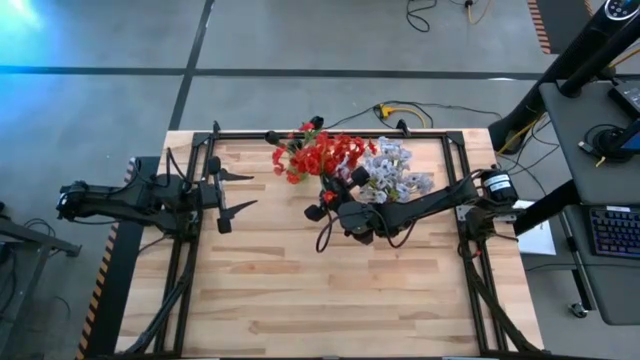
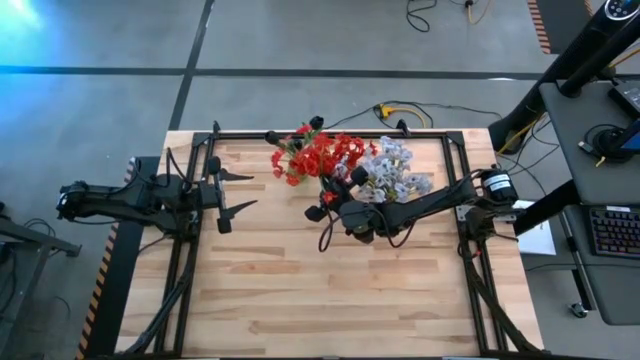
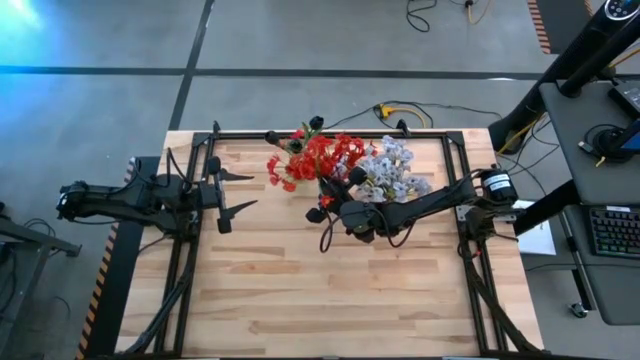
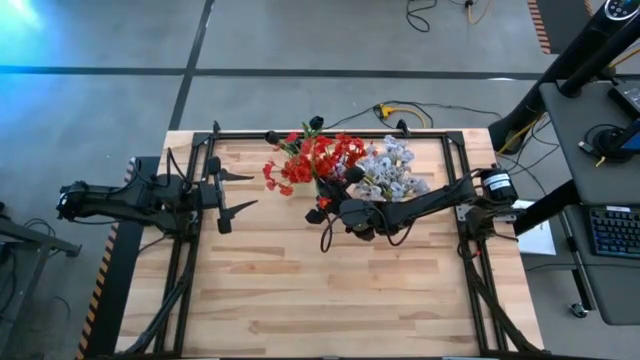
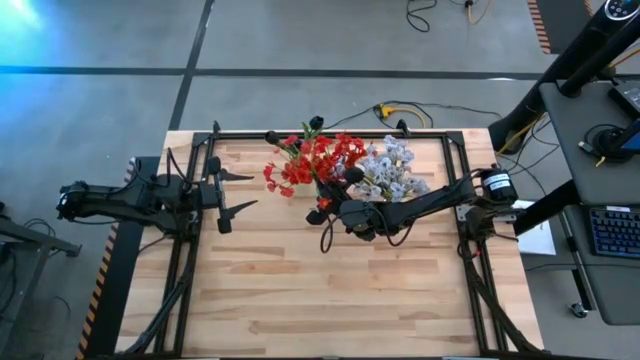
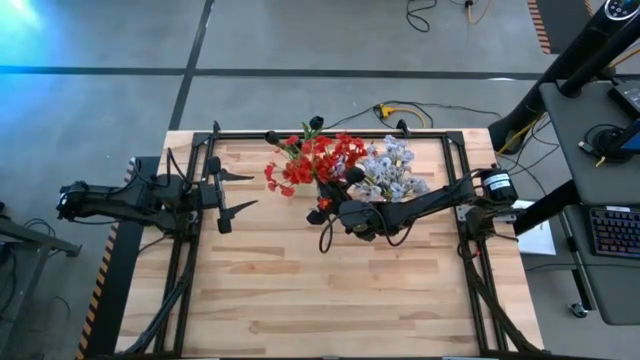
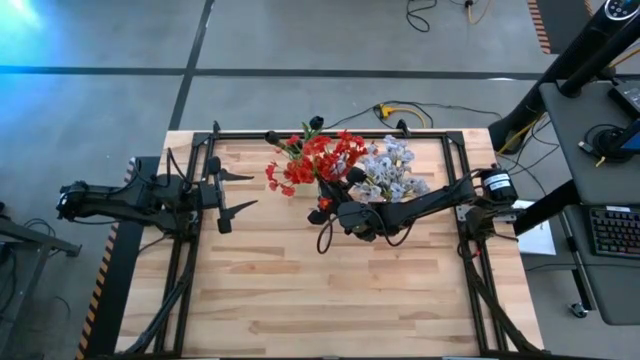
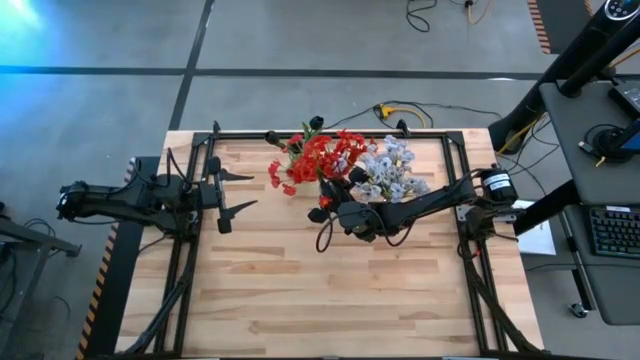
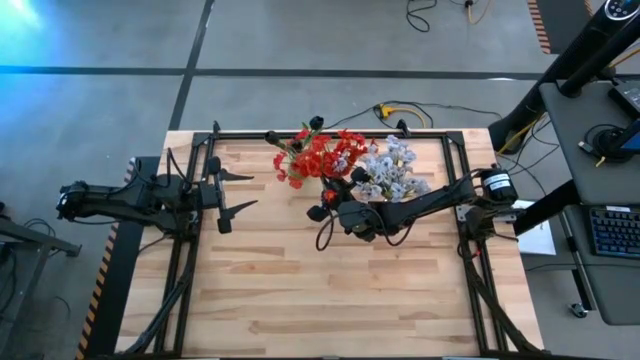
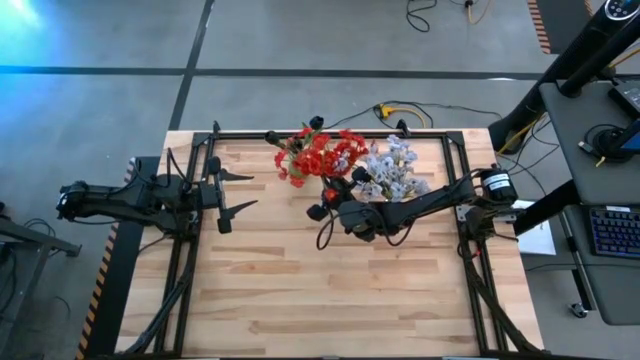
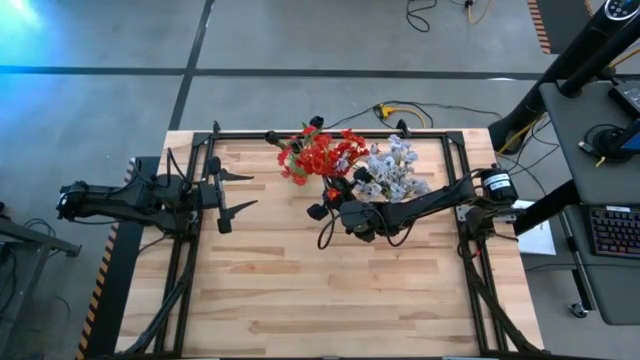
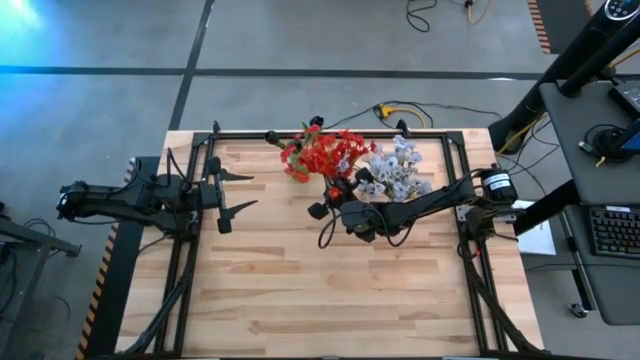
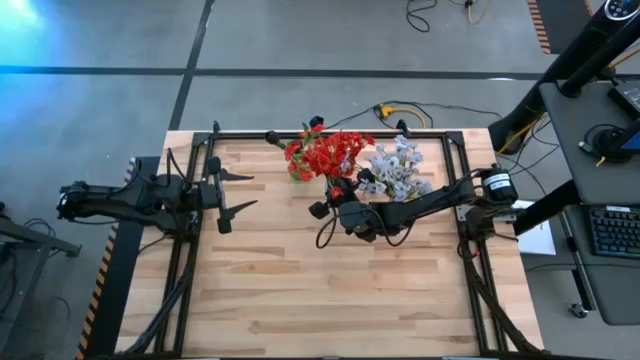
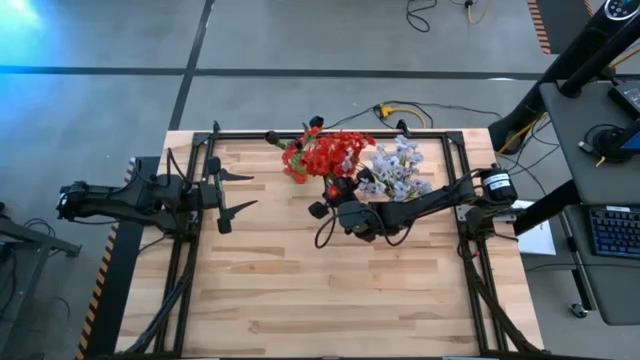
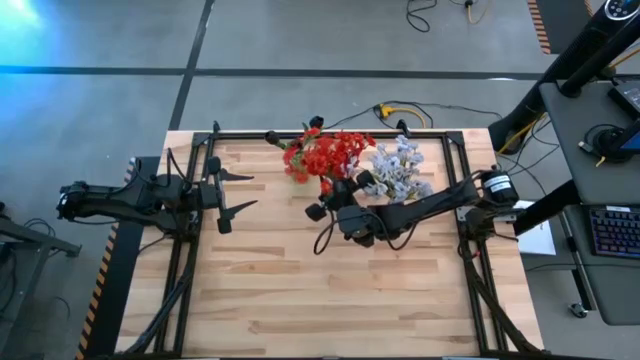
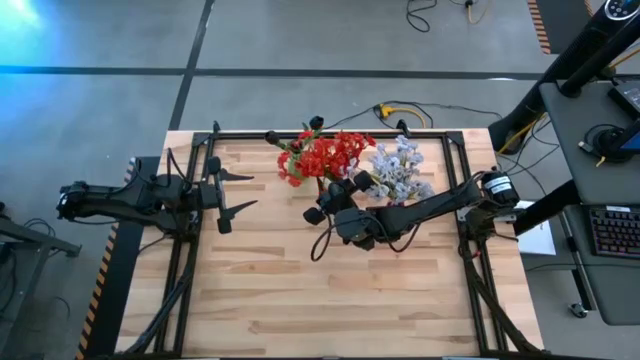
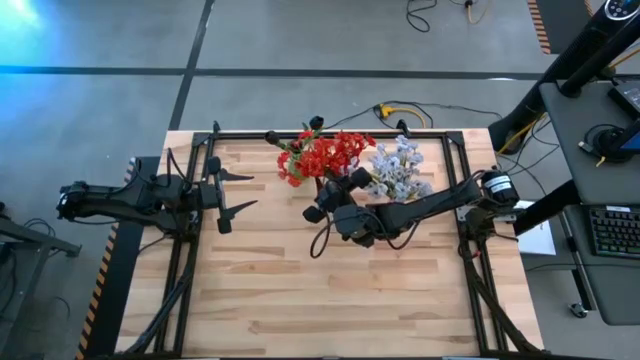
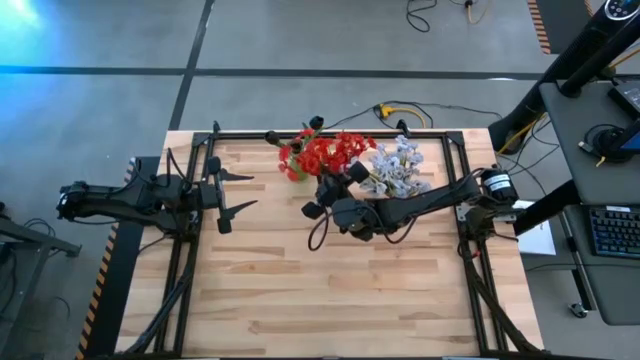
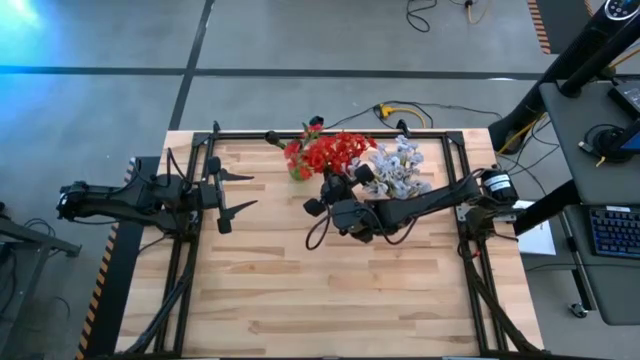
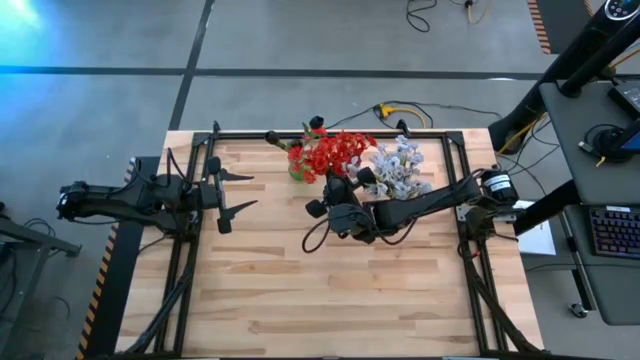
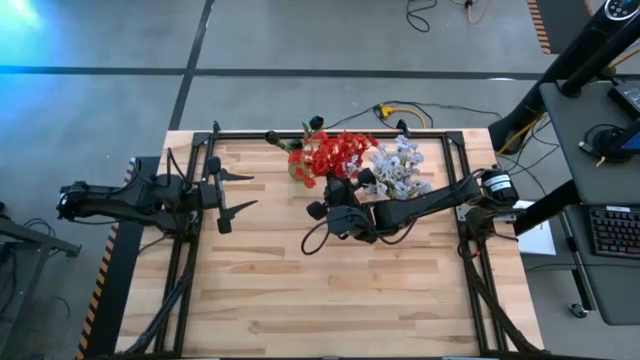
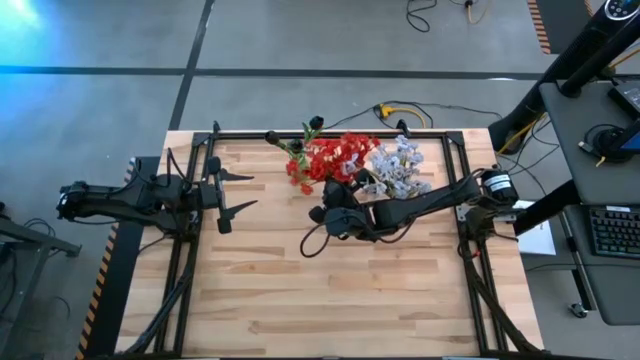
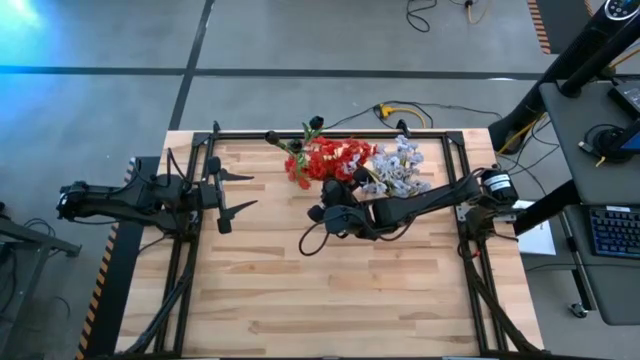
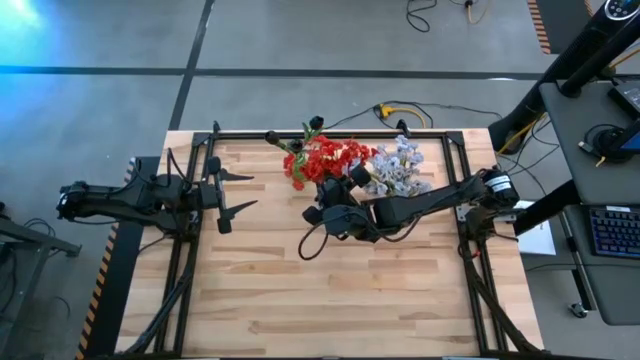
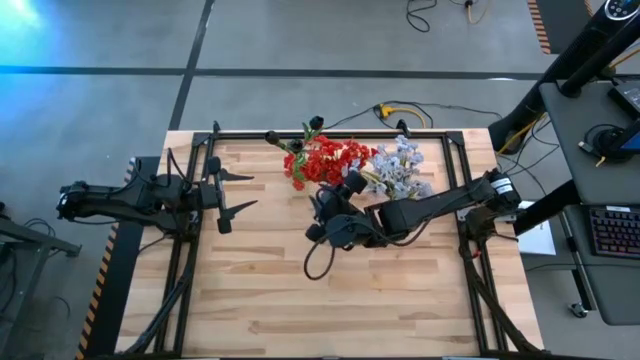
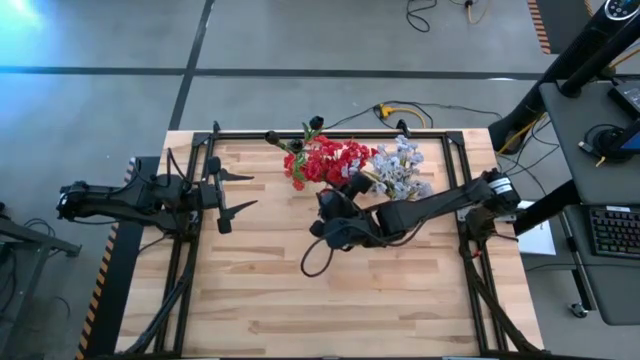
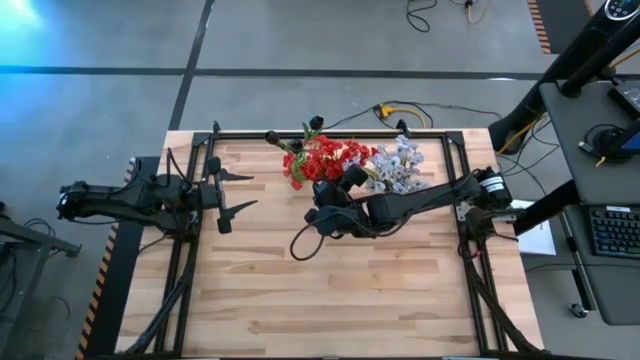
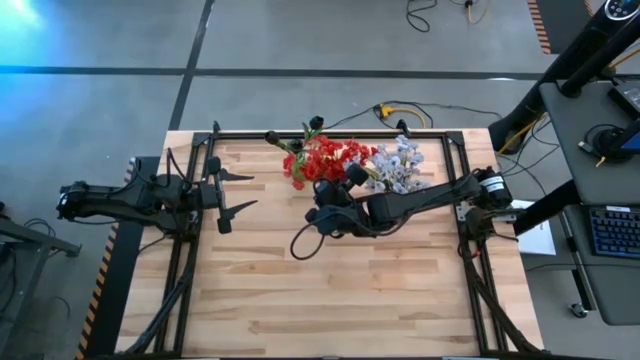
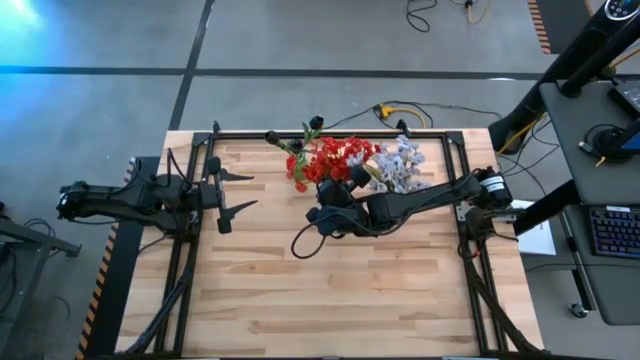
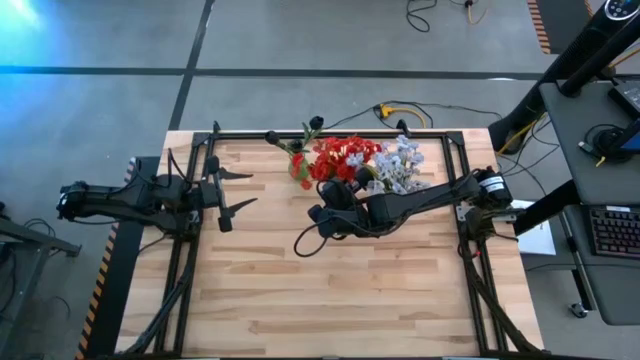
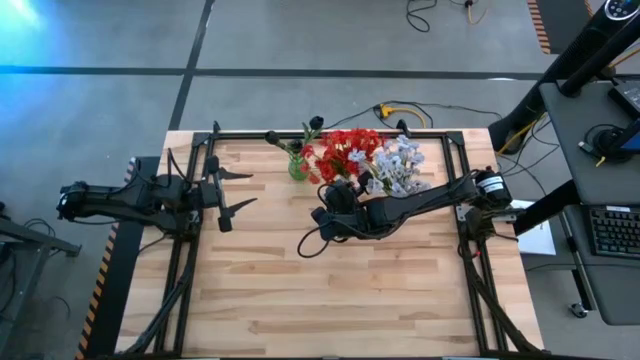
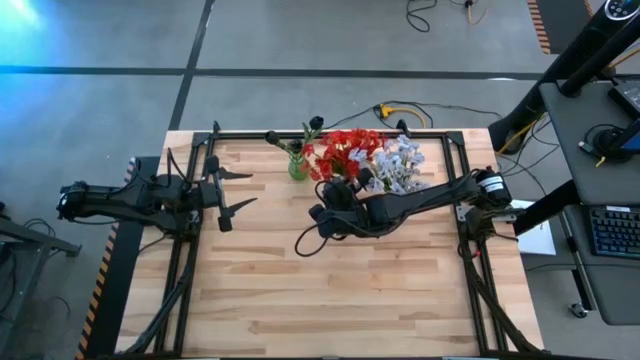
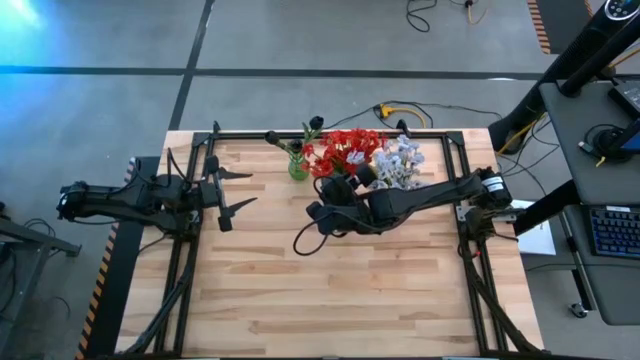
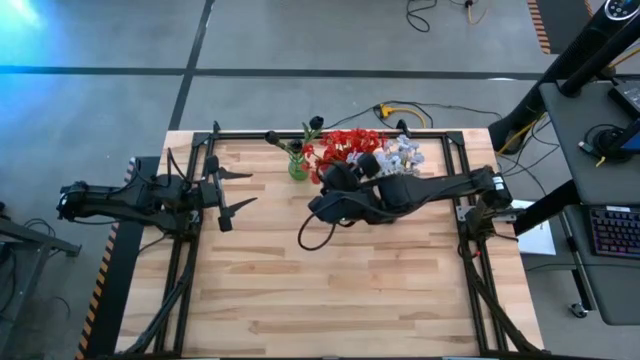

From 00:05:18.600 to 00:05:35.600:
Task: Sort flowers into vase by color
Put the orange flowers into the transparent vase

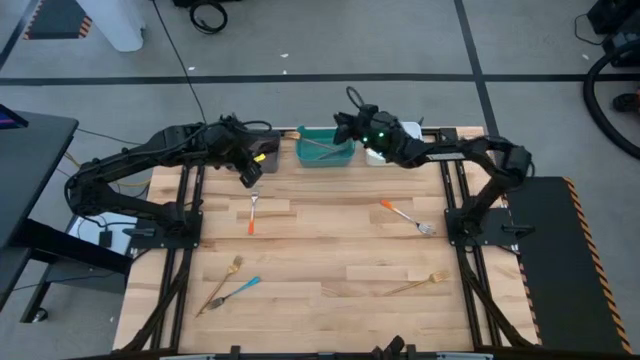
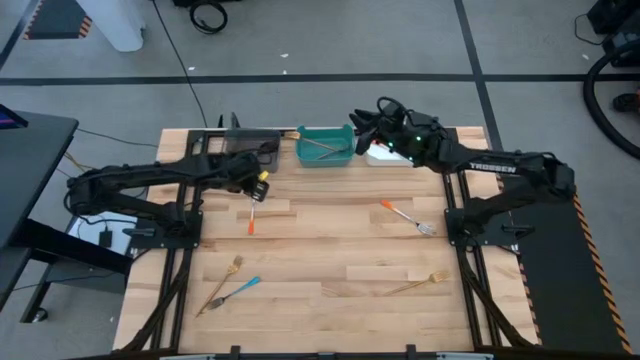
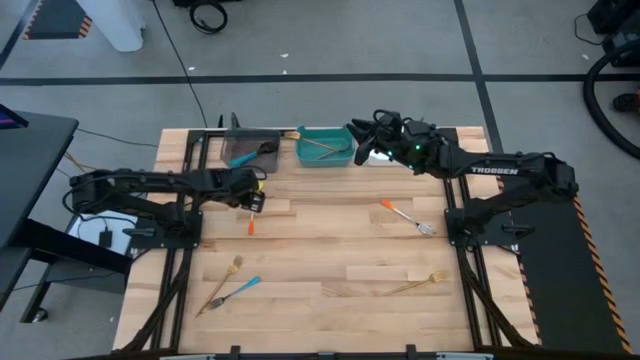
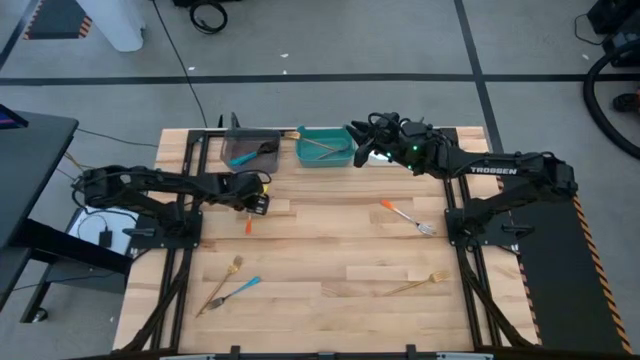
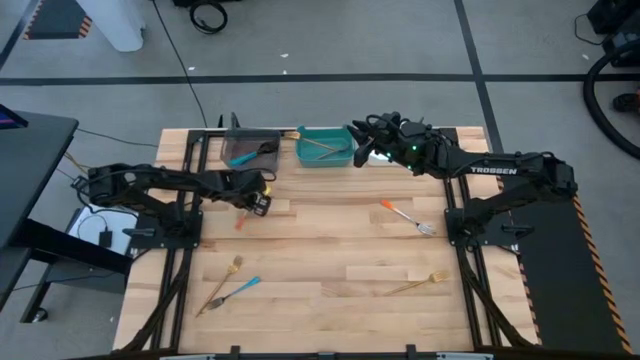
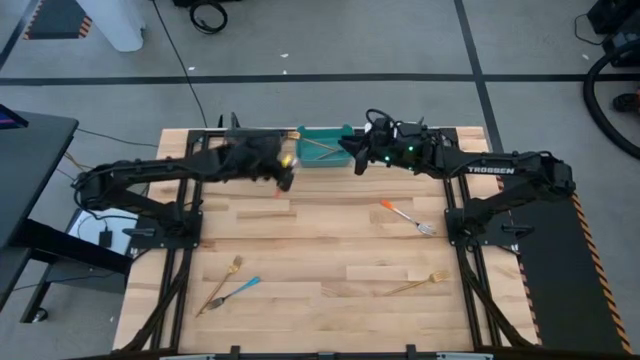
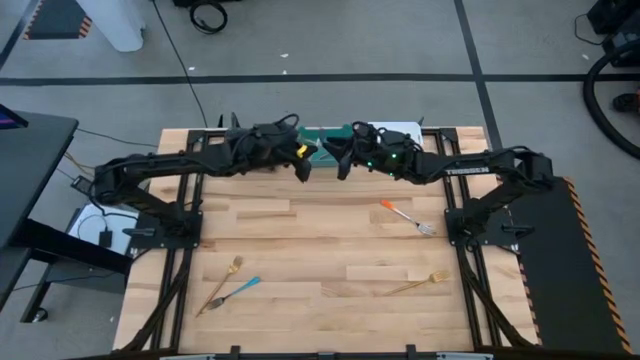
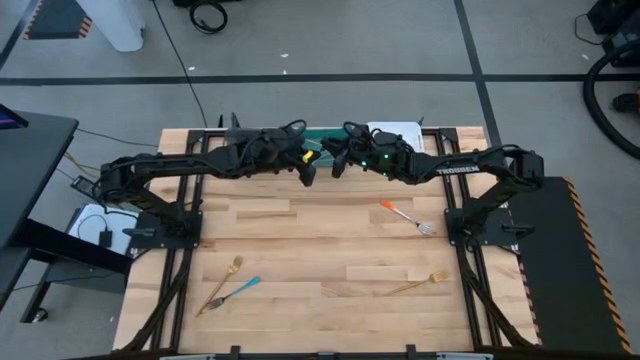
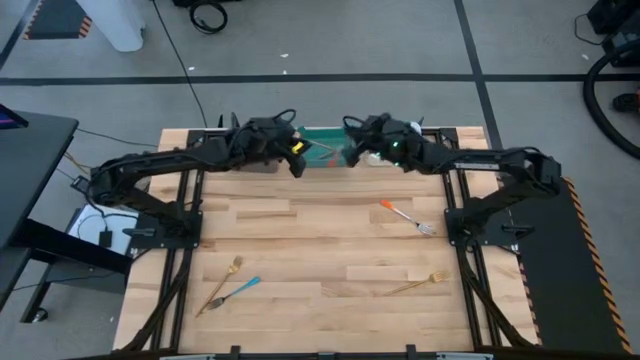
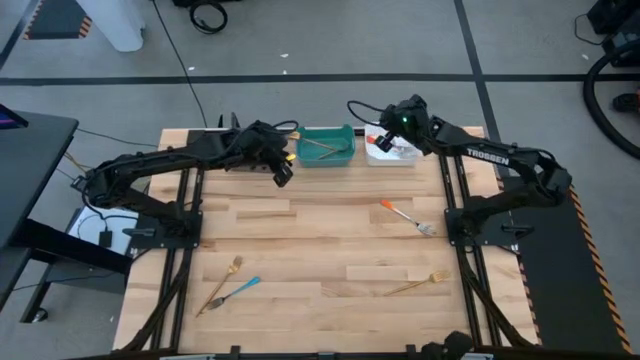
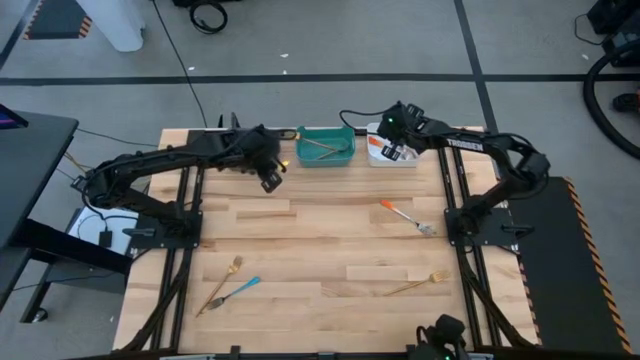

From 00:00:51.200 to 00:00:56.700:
Task: Sort silverware by color (type)
Put the orange fork into the white bin
